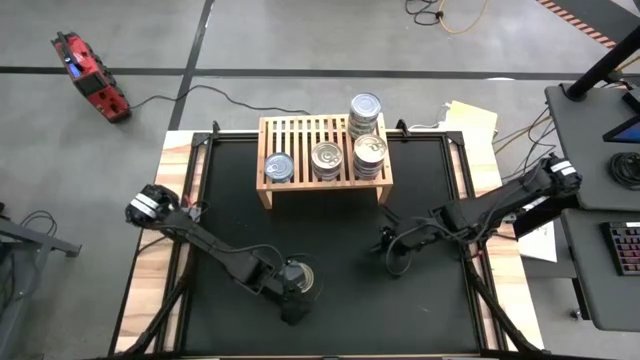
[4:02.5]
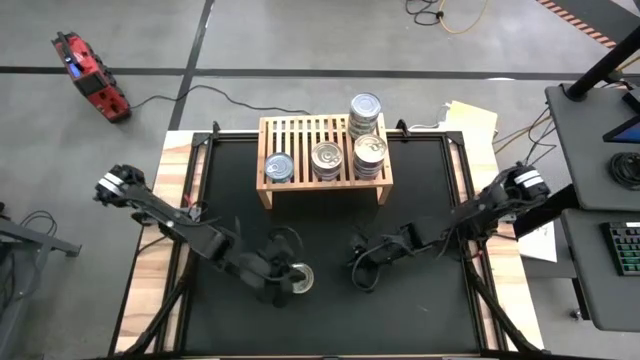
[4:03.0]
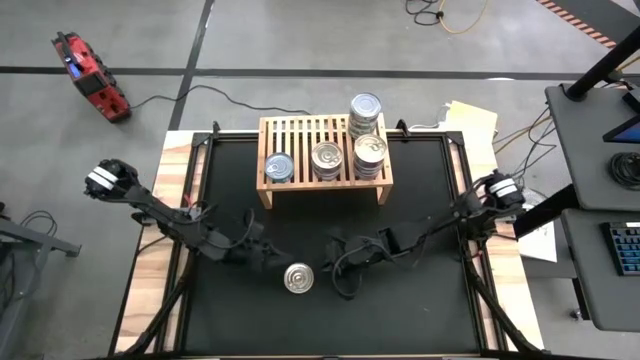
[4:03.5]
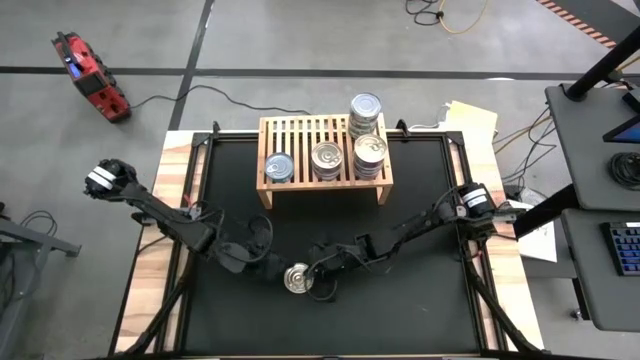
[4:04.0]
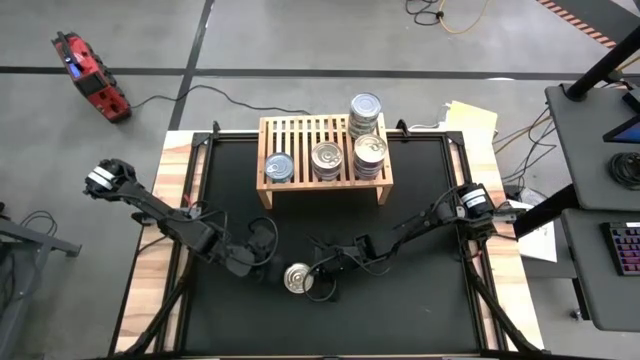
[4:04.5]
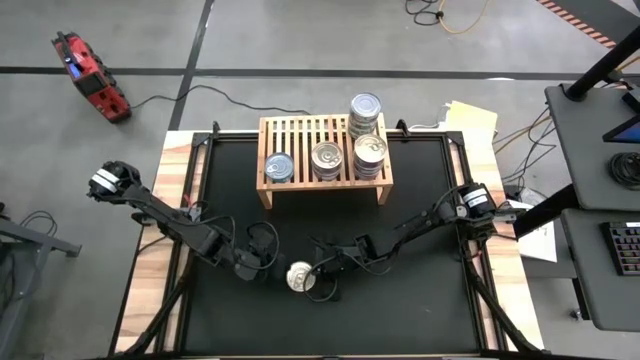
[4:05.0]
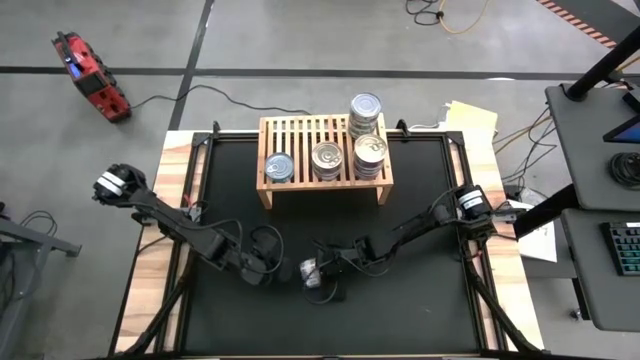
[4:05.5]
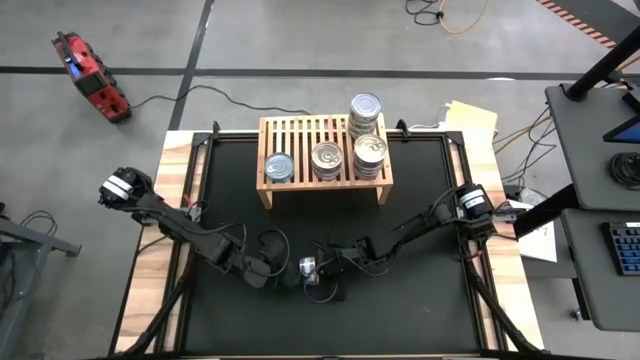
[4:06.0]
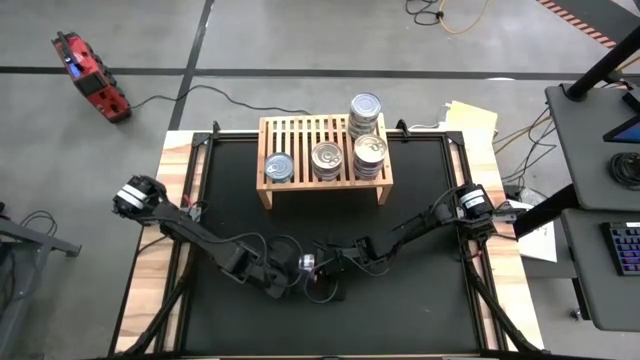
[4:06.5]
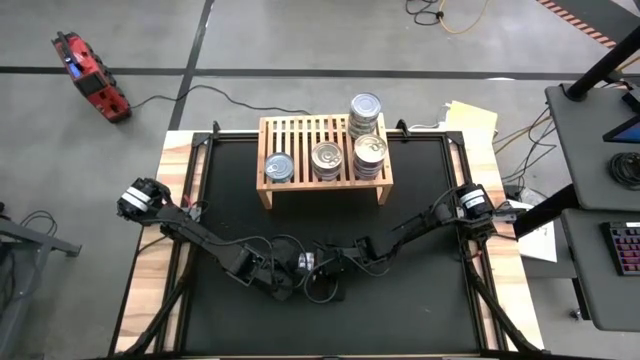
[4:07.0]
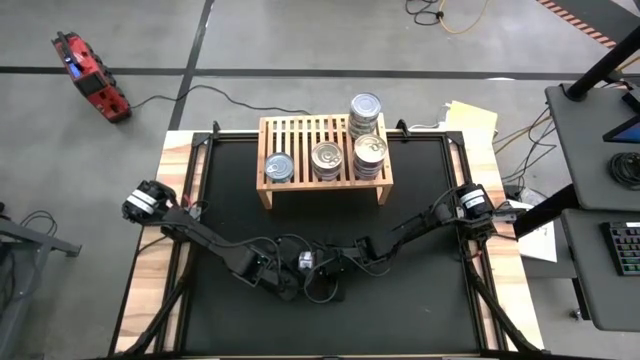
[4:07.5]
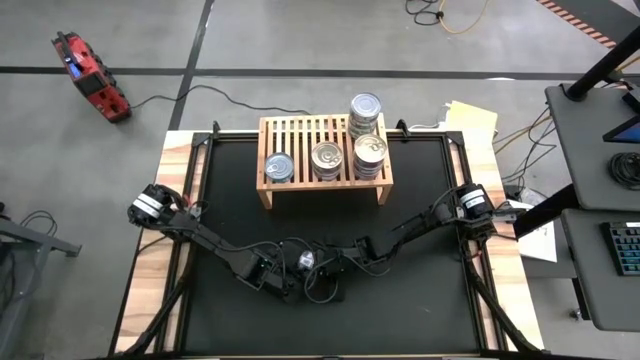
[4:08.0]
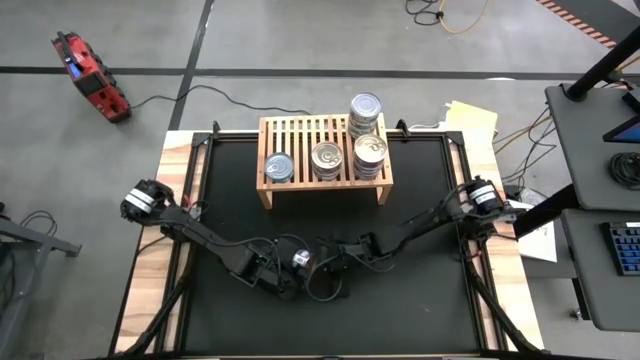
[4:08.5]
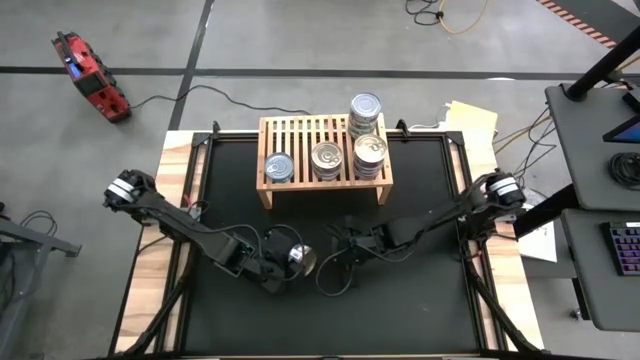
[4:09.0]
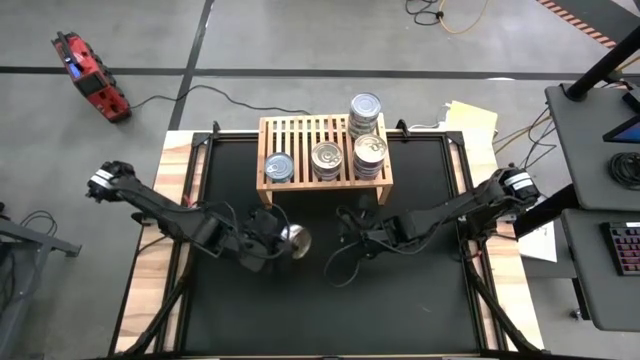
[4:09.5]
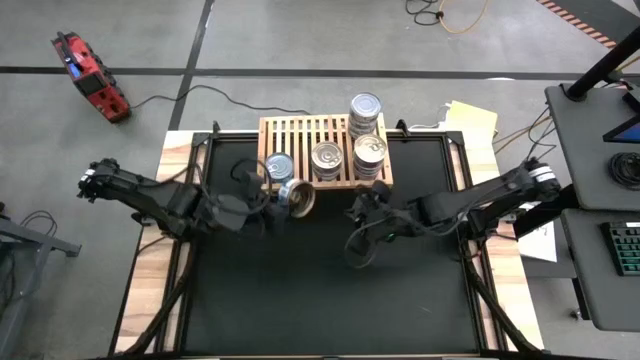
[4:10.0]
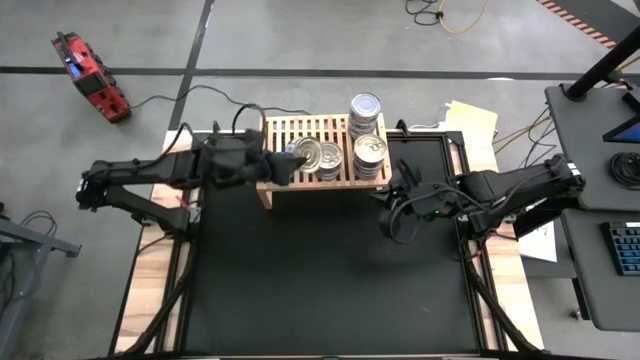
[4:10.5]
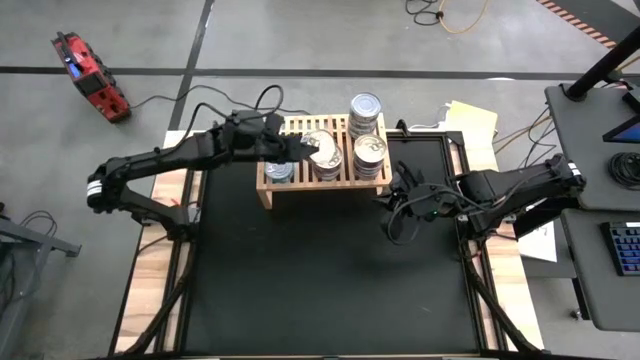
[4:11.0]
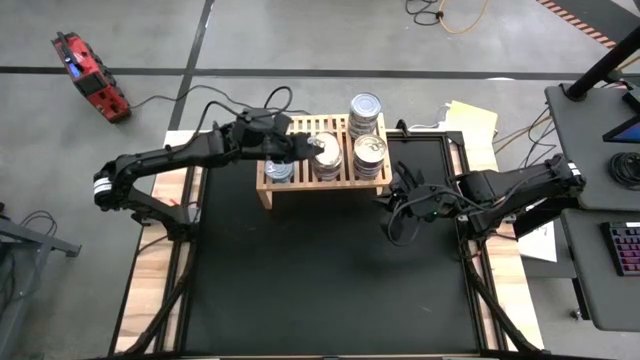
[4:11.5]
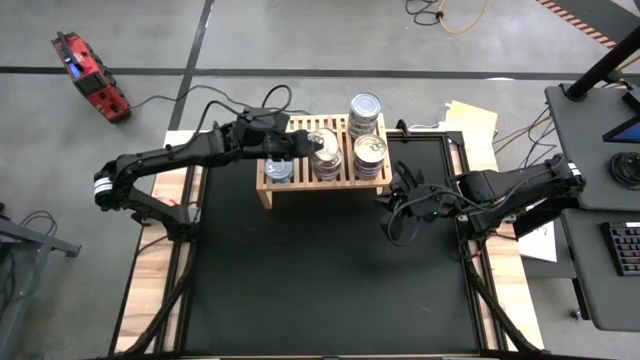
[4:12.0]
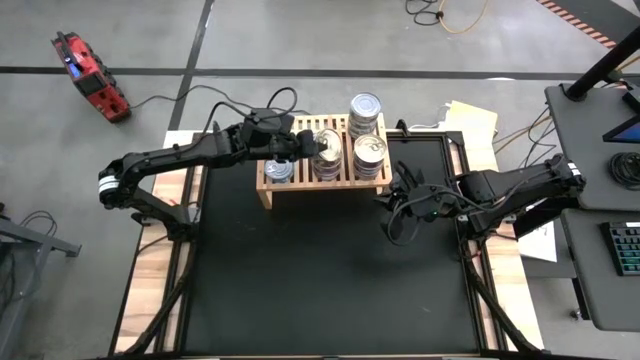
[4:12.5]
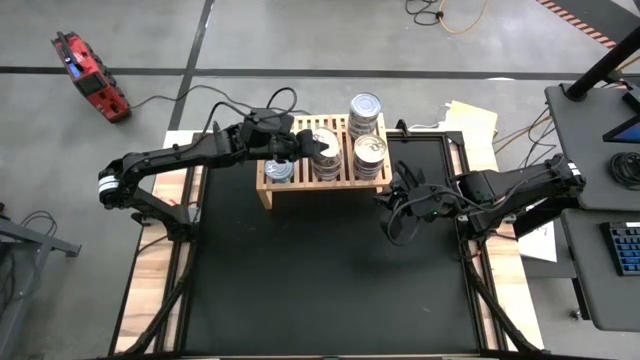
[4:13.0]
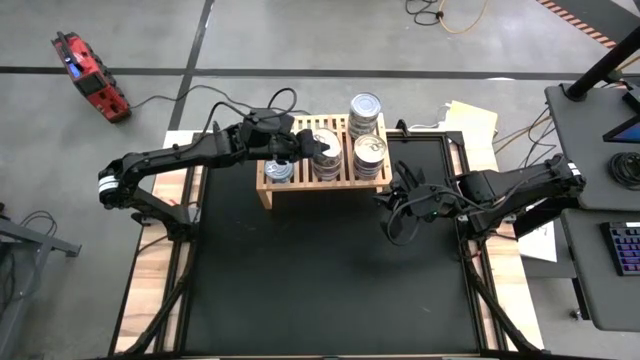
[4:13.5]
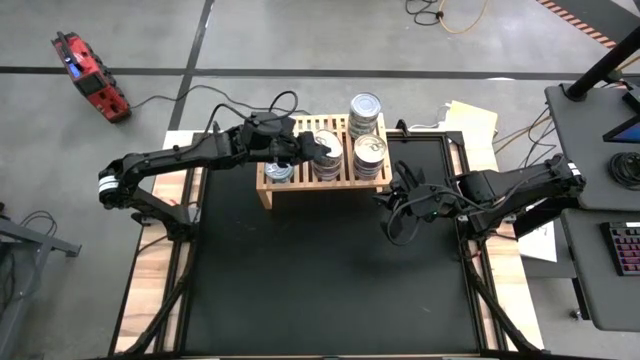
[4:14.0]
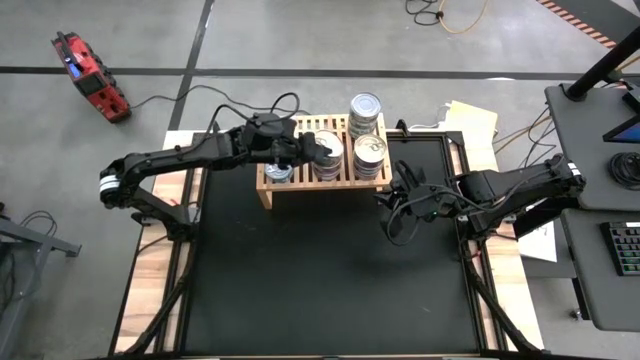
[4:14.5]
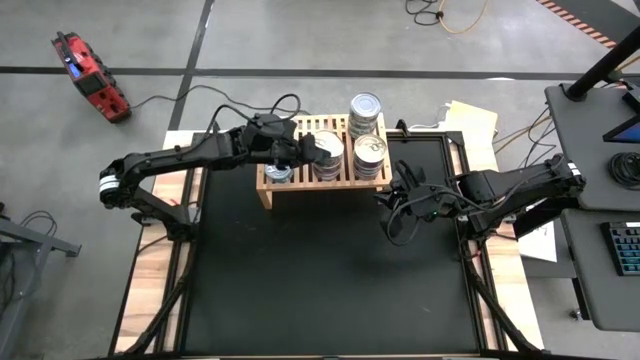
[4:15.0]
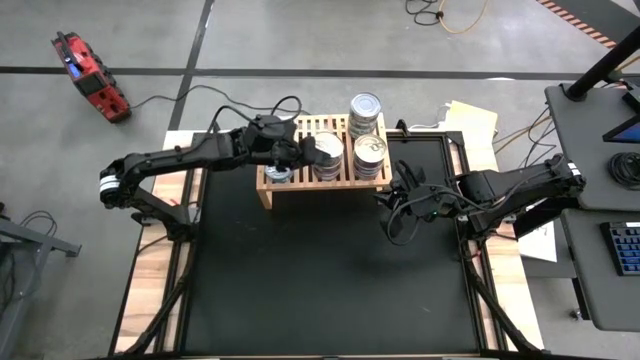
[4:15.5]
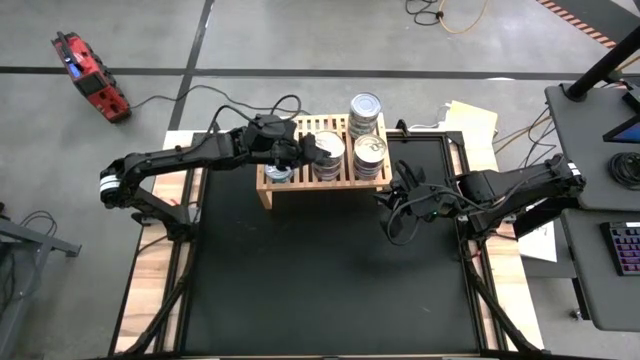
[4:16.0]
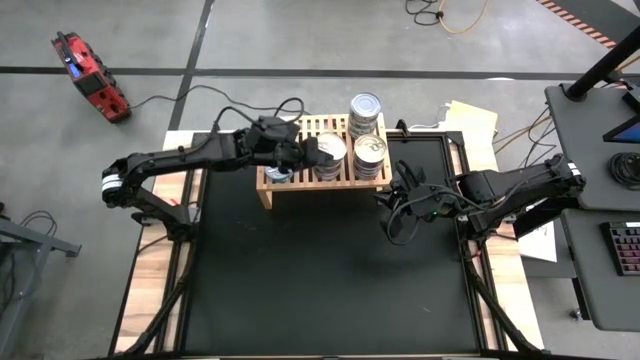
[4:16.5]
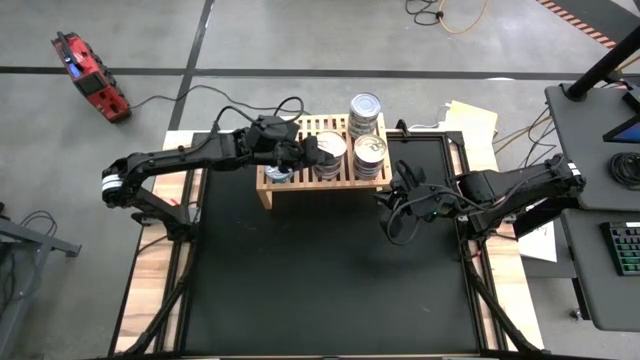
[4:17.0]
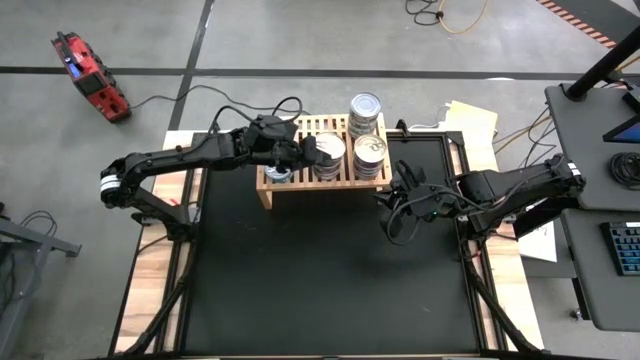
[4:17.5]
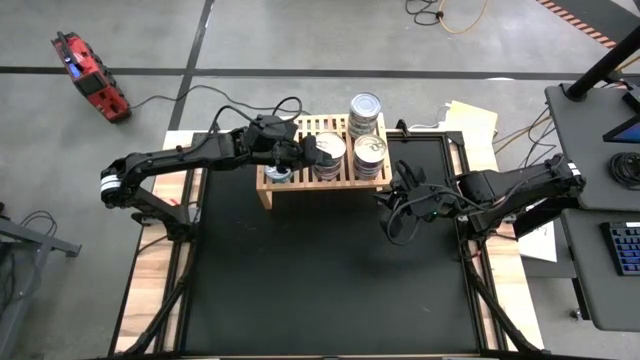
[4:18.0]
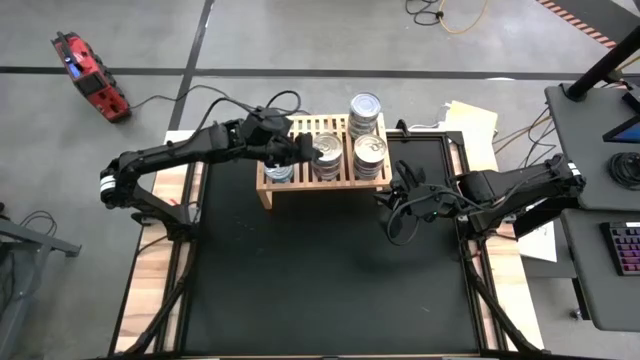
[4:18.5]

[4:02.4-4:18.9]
Task: Stack canned seafood by type on shelf
Stack the blue pink tuna can on top of the blue pink tuna can on the shelf

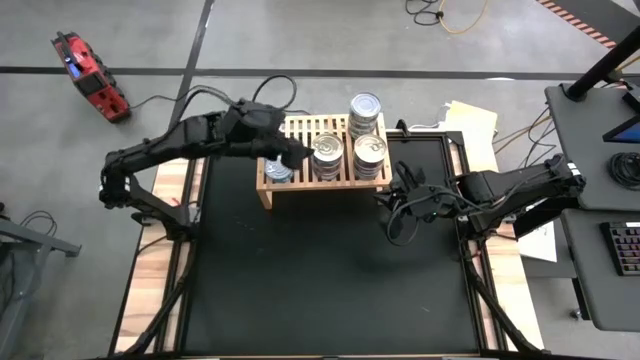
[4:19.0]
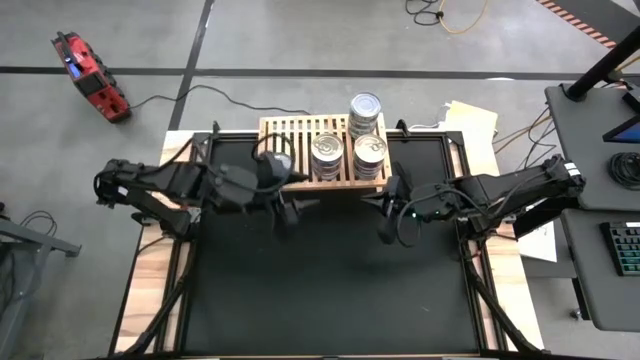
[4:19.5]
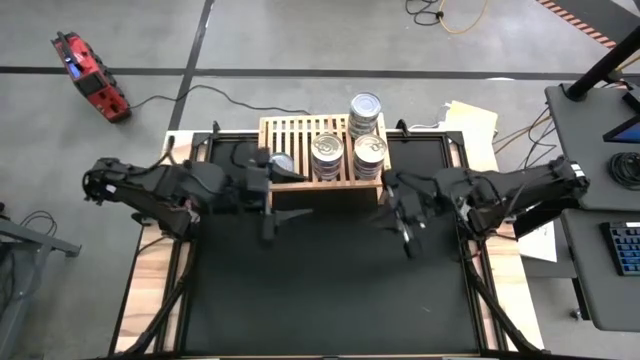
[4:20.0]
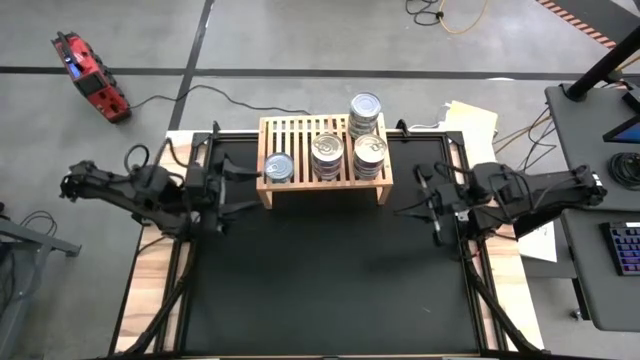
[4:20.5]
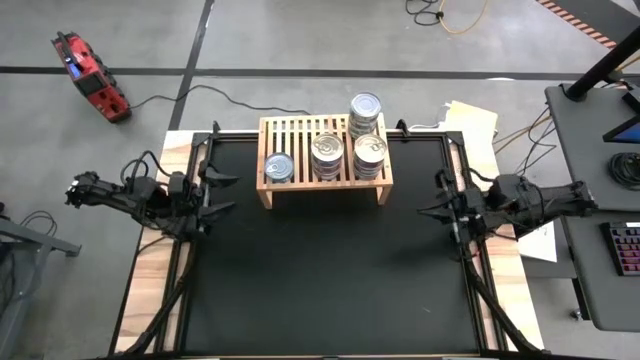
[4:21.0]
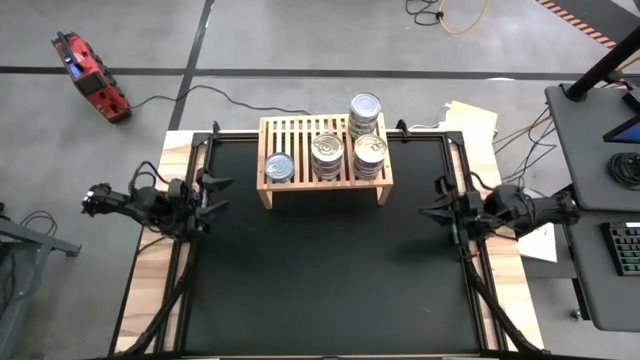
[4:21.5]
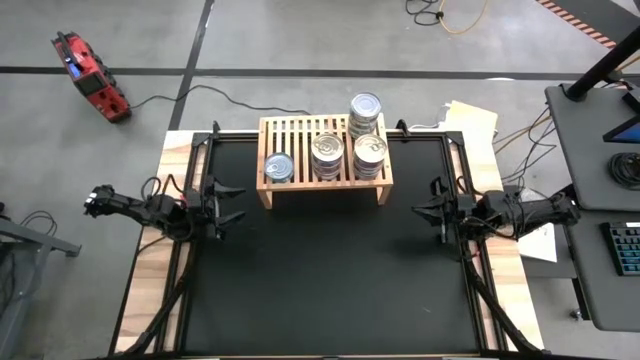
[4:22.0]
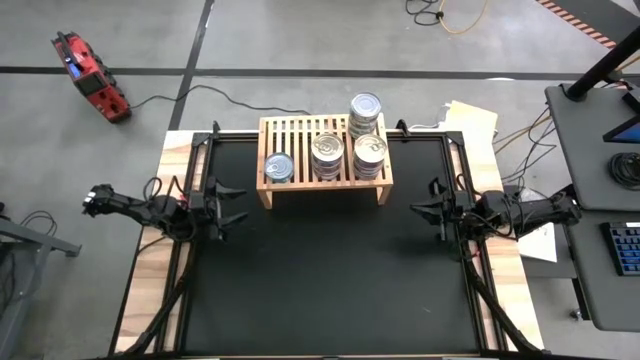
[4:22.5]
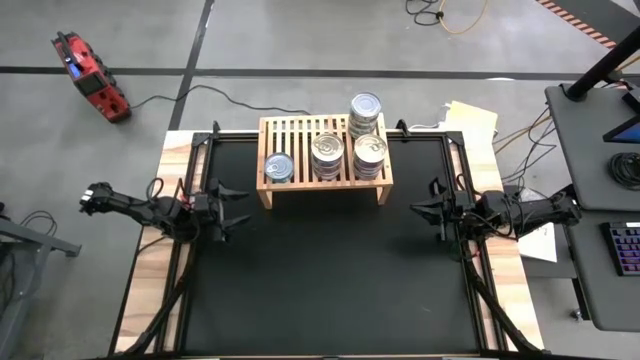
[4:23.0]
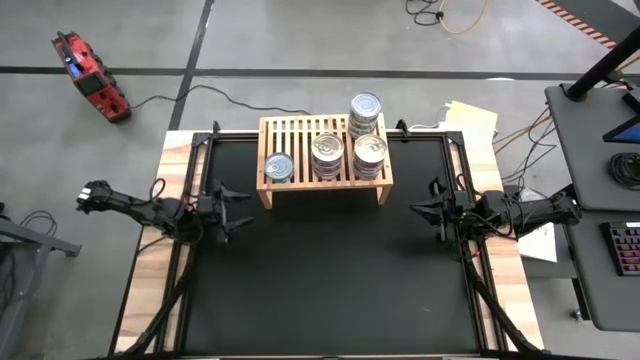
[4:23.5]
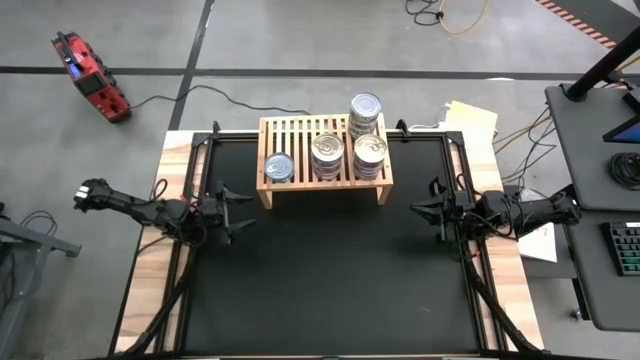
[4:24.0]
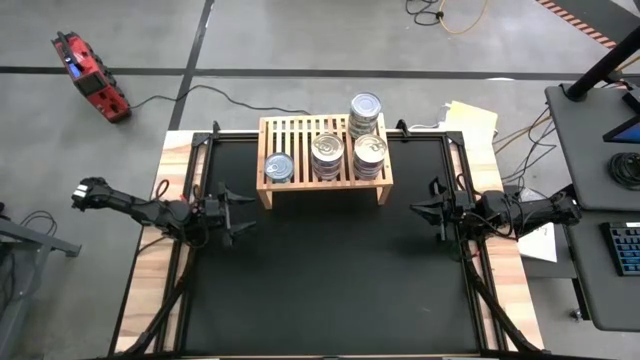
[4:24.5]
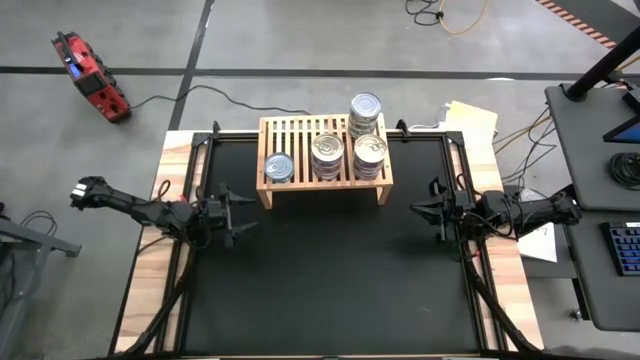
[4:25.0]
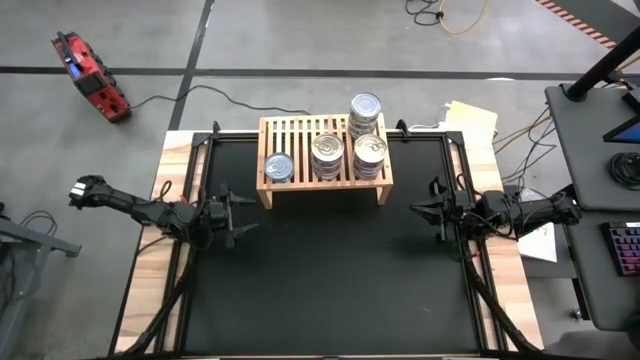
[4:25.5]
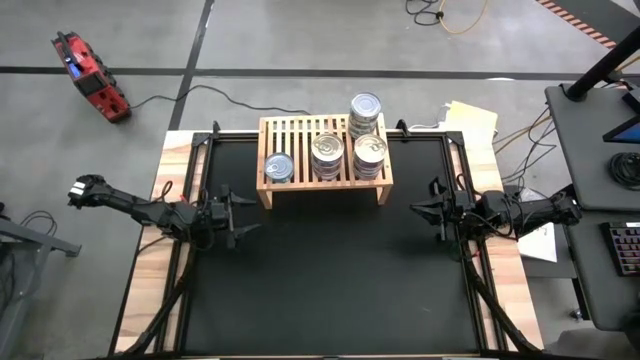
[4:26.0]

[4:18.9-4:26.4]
Return to Home Position
